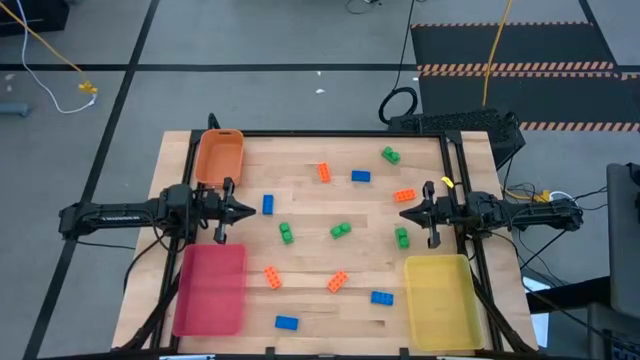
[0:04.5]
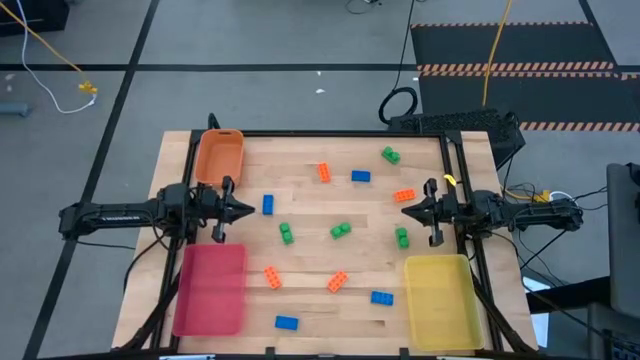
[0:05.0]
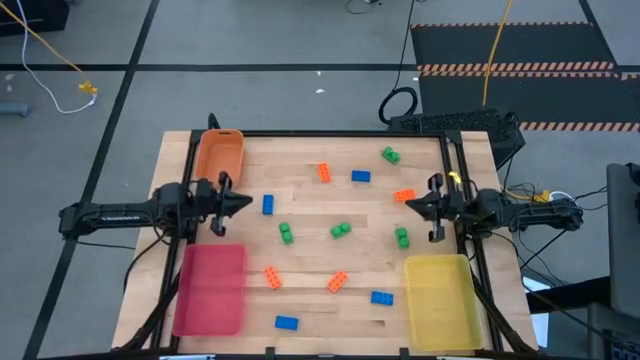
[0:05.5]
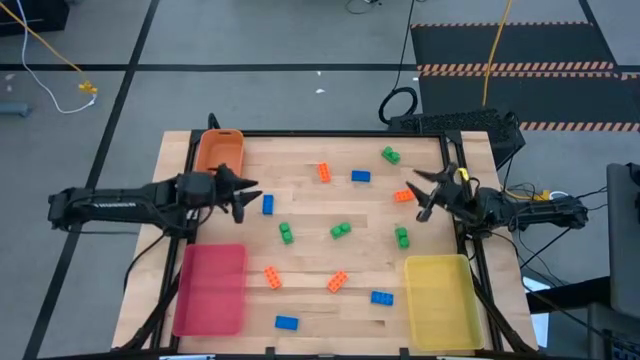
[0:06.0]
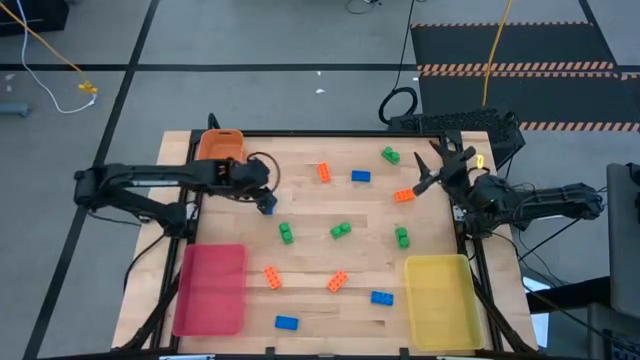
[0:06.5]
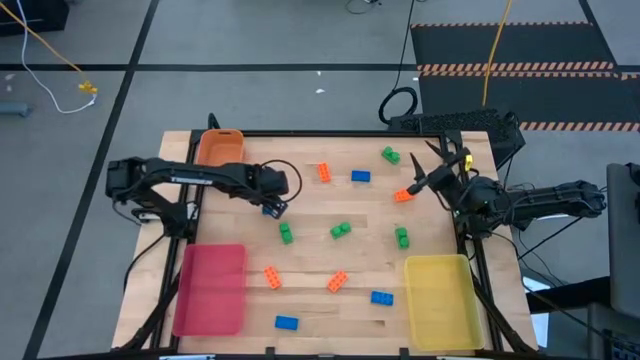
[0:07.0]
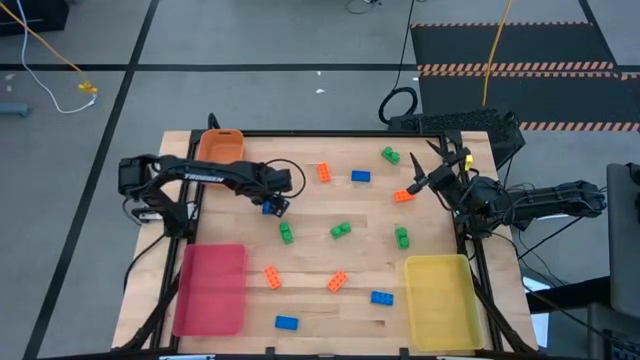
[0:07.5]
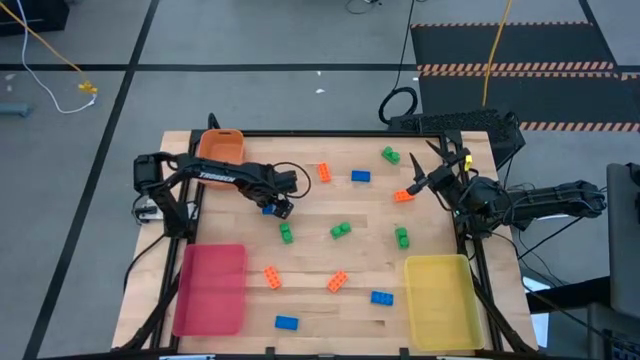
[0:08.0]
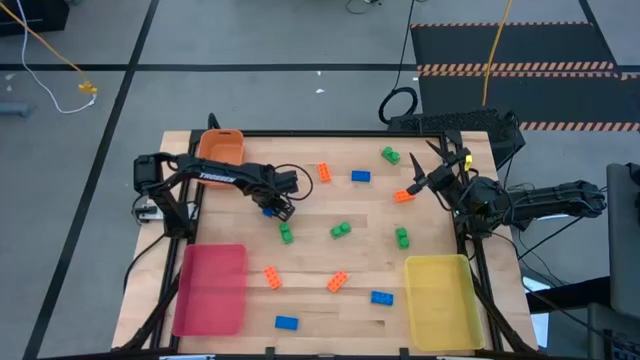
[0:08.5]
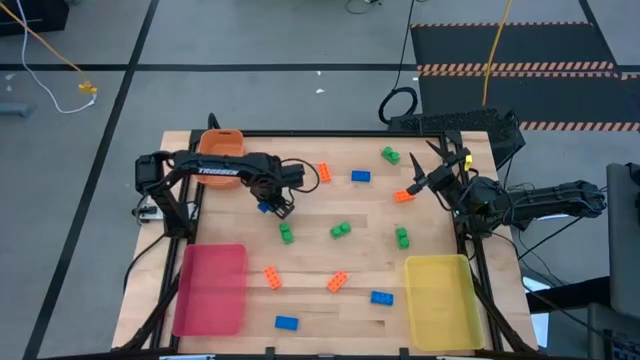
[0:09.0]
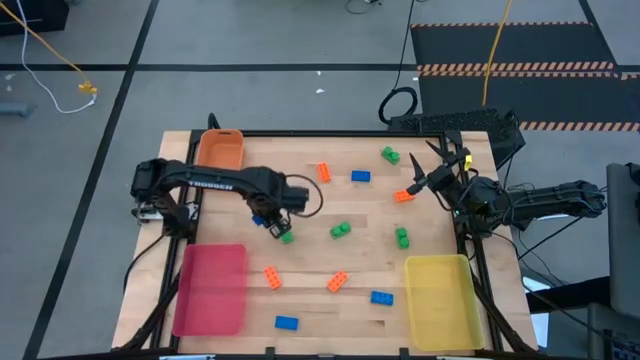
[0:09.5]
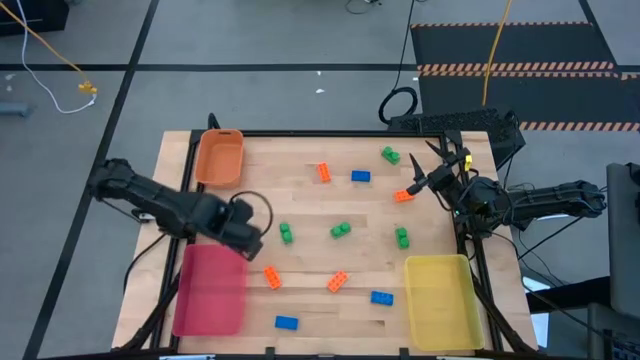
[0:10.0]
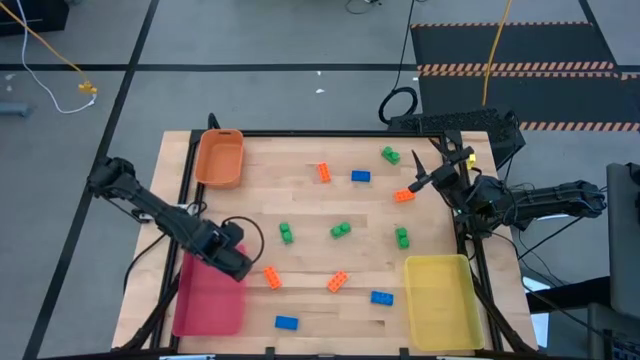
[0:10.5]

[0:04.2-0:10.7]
Task: Sort & place blocks by color
Put the blue game piece into the red bin

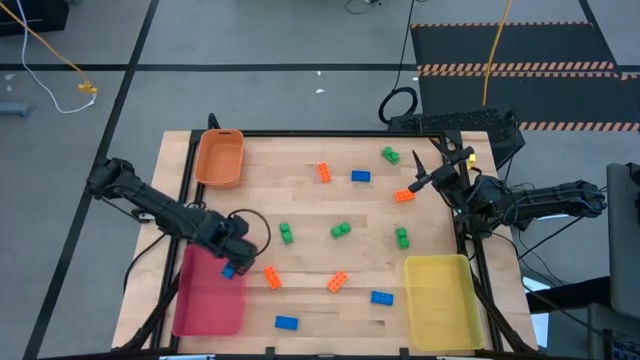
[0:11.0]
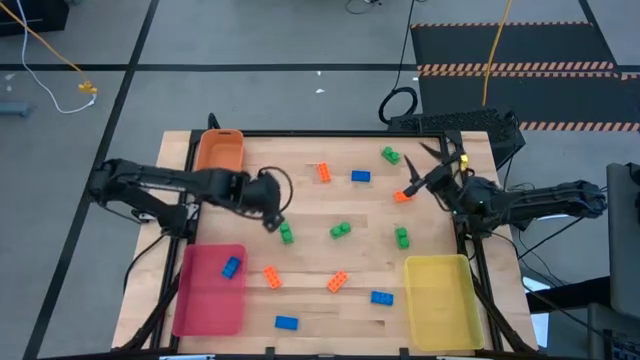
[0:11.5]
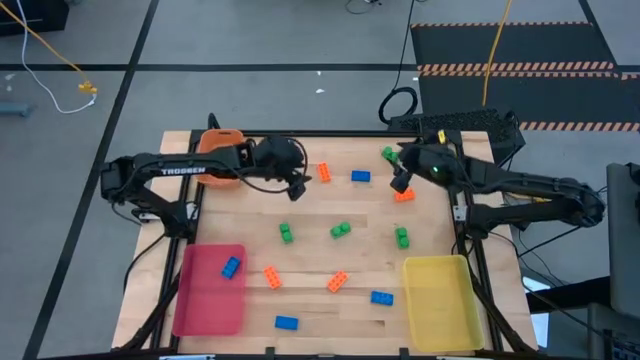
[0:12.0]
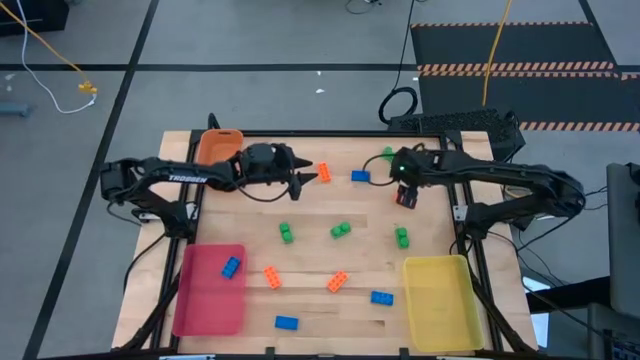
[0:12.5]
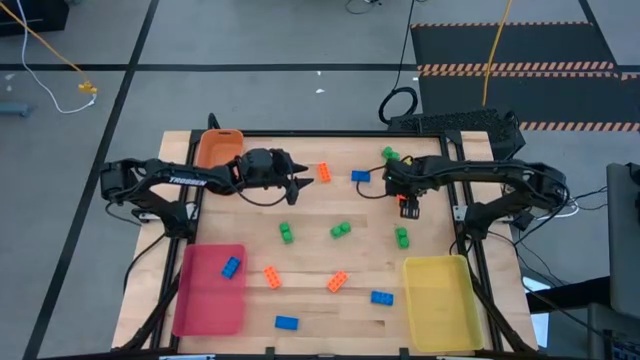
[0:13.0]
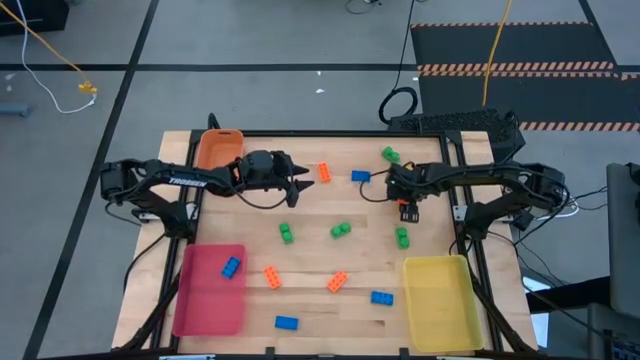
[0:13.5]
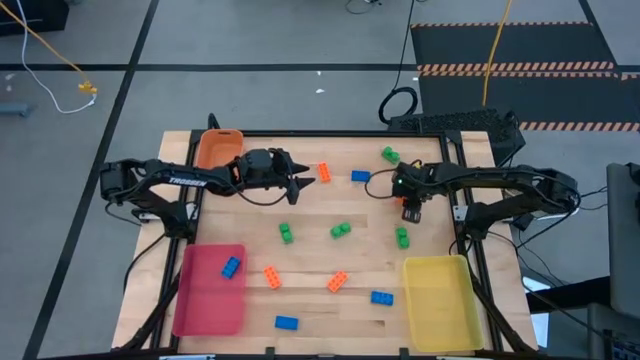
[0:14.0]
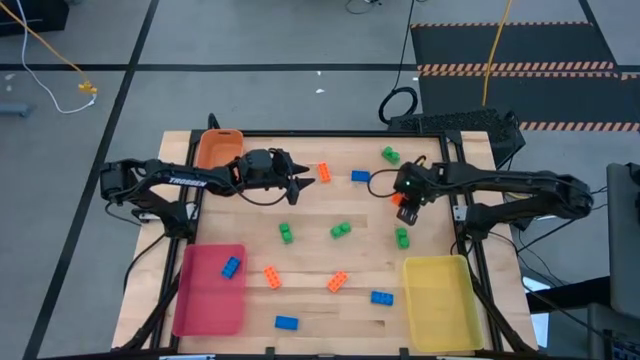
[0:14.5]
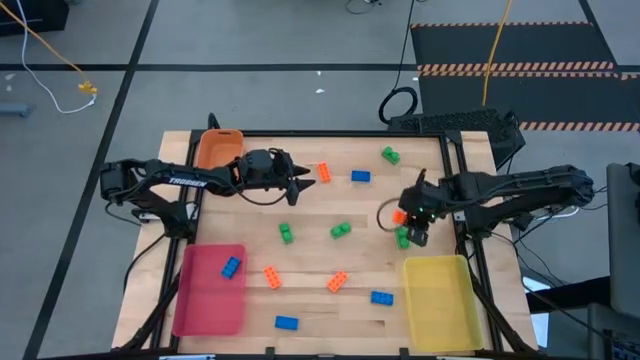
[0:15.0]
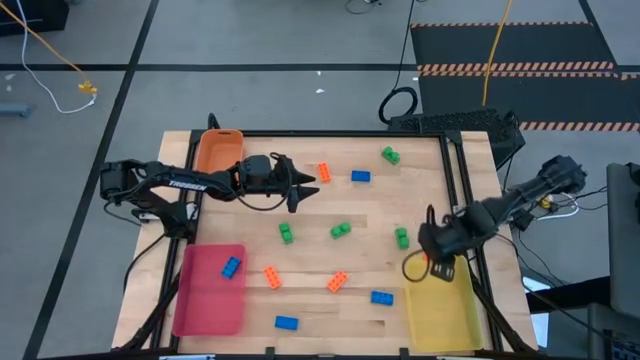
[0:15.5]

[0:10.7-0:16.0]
Put the orange game piece into the yellow bin

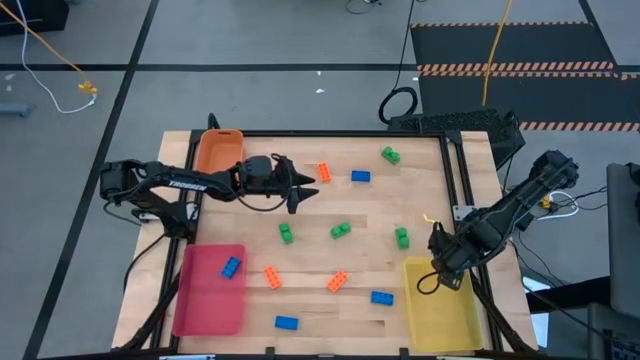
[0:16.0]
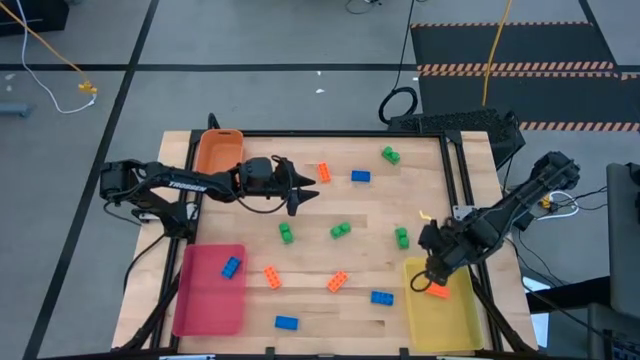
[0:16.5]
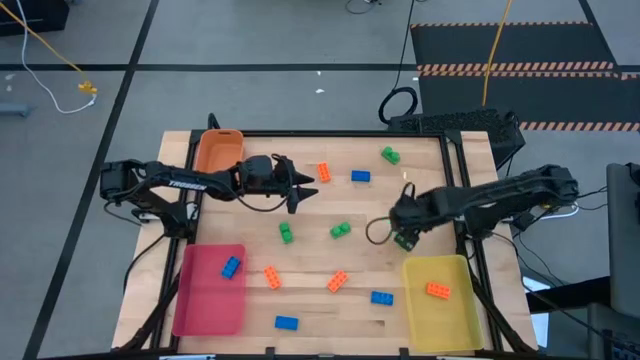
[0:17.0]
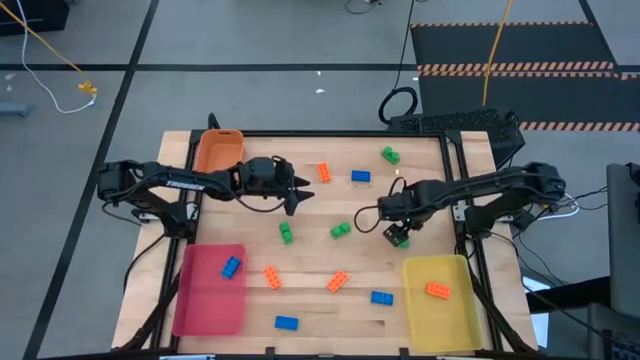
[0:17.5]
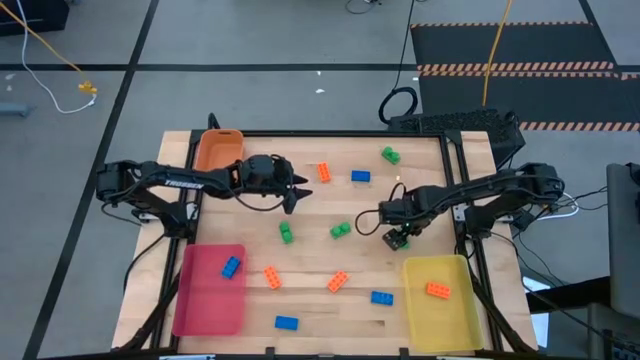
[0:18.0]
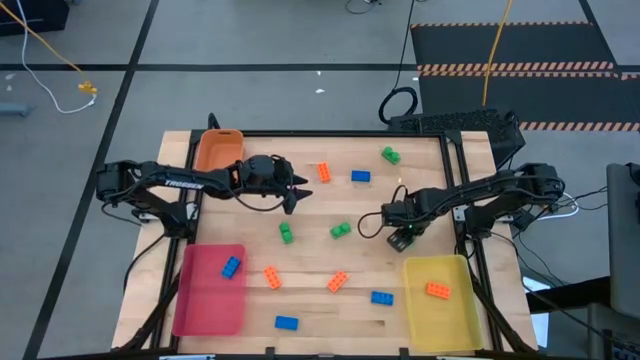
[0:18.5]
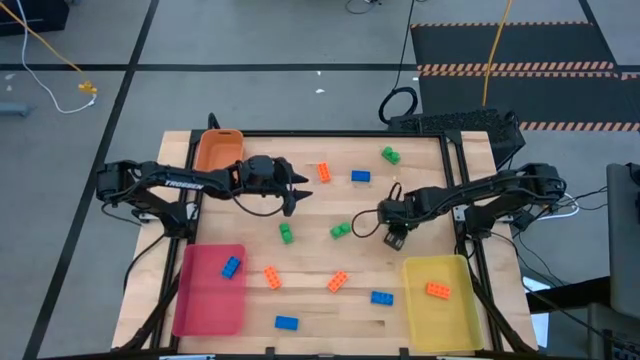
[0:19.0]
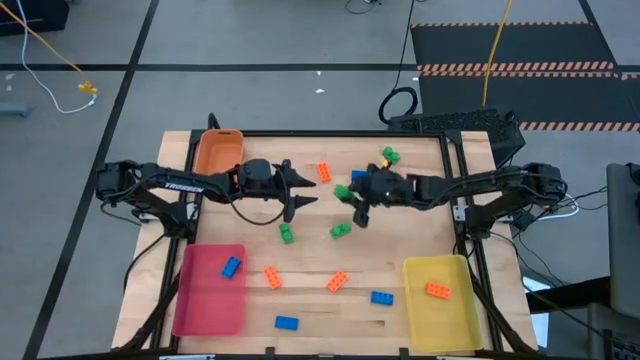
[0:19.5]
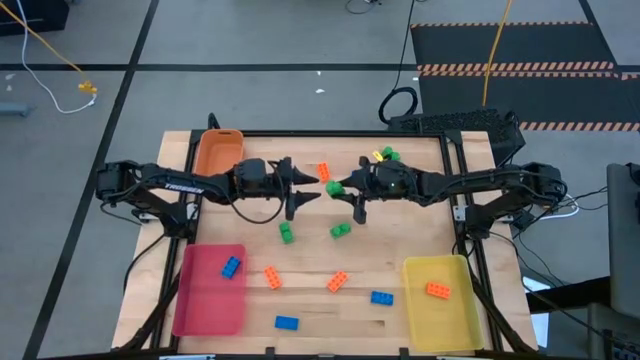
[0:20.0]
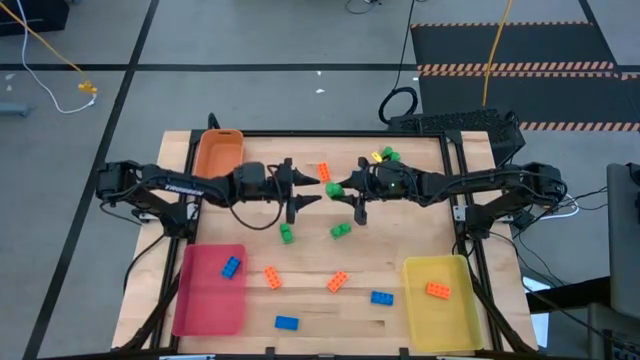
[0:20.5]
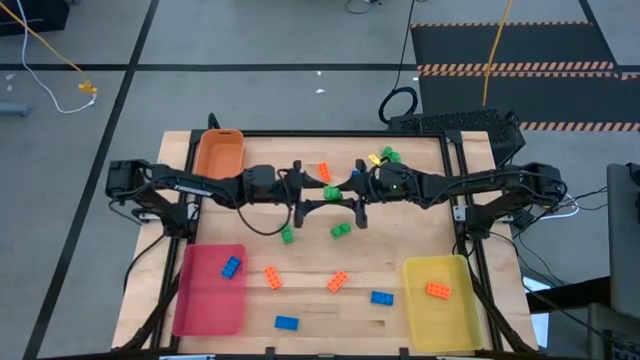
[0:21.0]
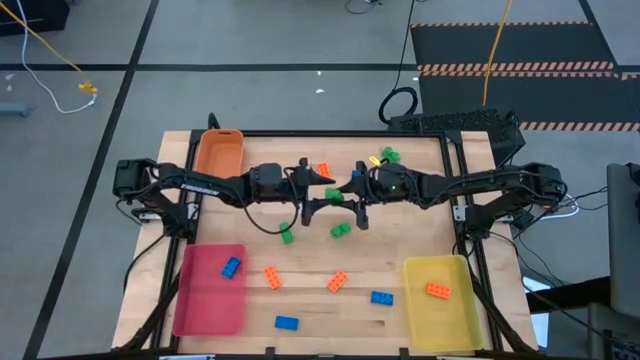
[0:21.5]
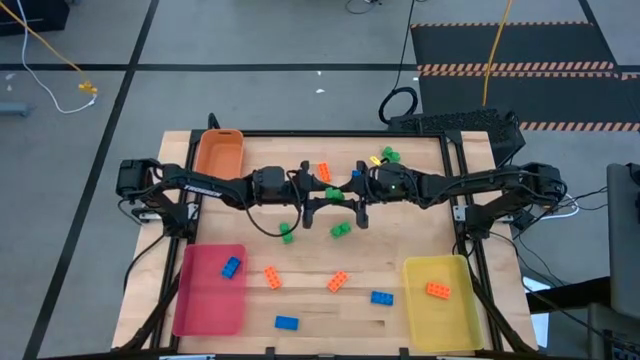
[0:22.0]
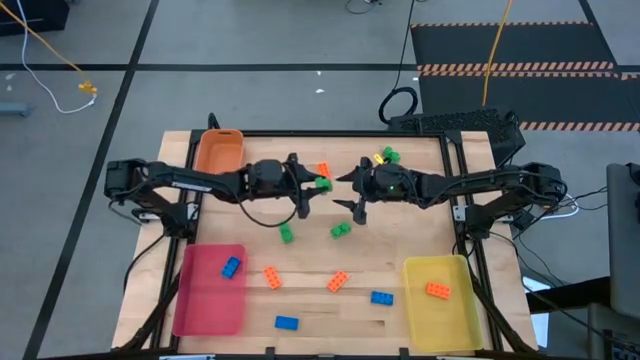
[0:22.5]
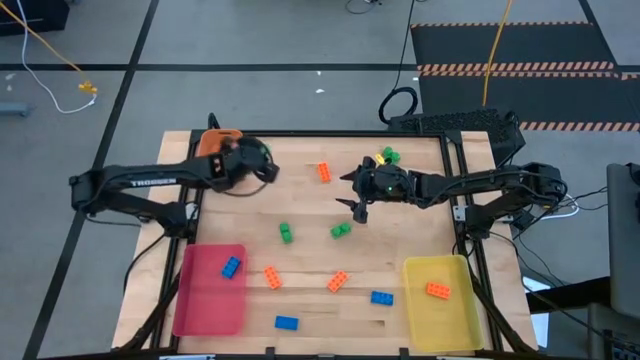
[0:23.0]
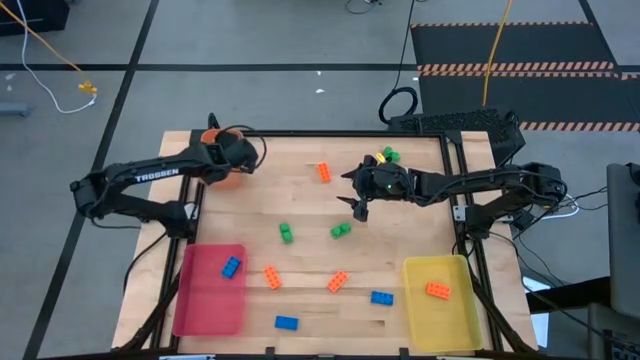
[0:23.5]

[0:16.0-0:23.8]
Put the green game piece into the orange bin

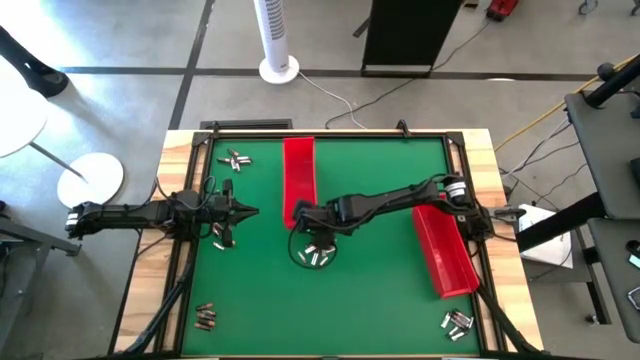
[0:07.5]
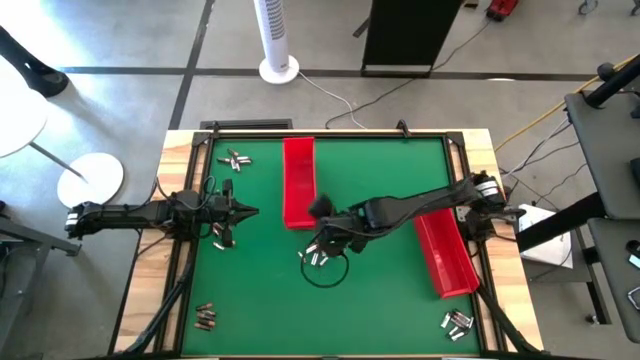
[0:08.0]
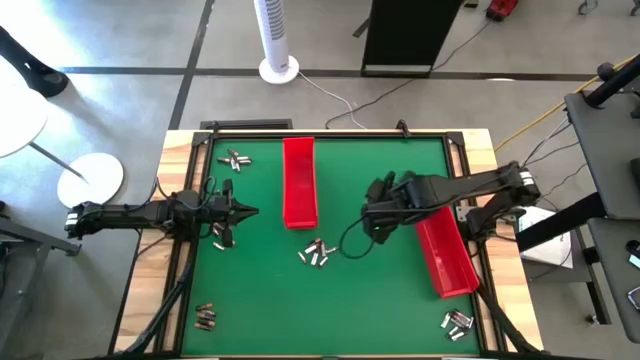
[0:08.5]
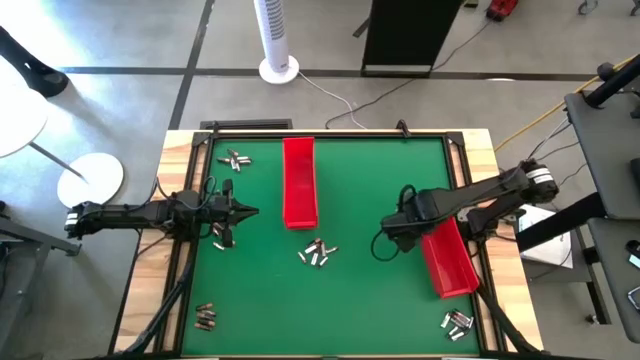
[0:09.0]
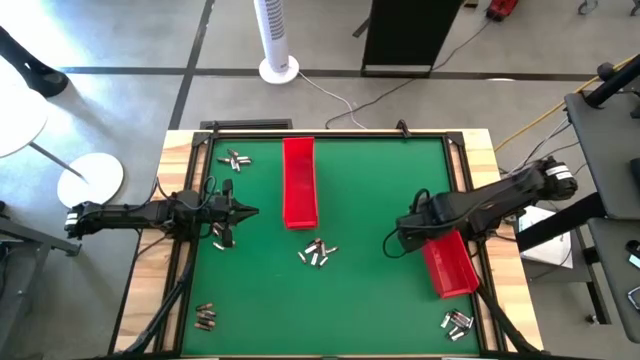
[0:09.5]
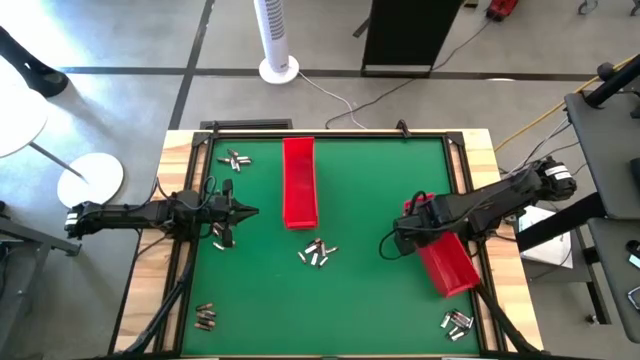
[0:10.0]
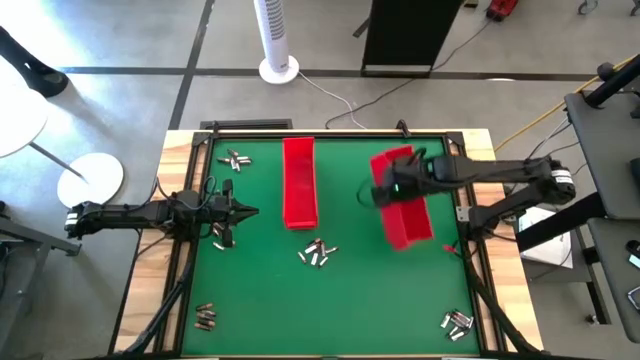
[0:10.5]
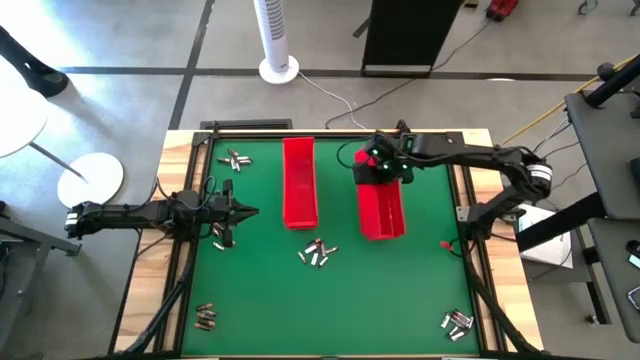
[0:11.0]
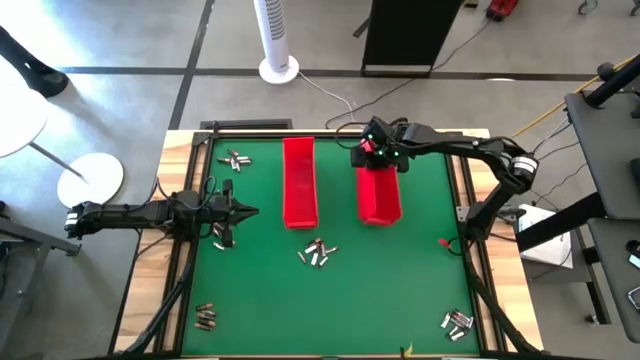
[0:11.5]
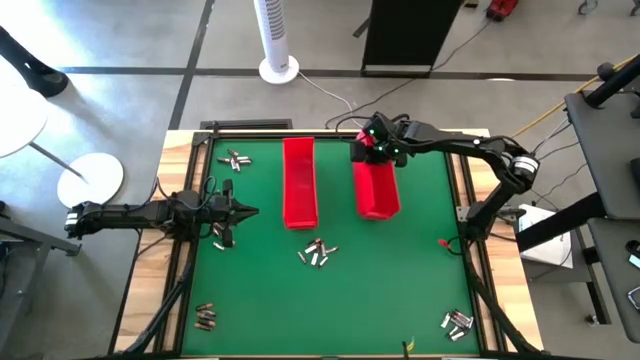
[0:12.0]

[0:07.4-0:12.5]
Task: Sort batteries
Move the red bin to the top of the table
